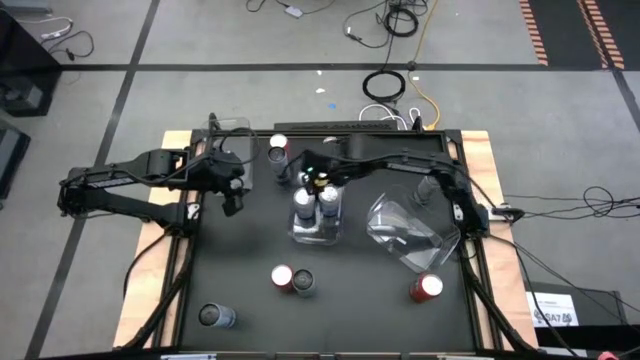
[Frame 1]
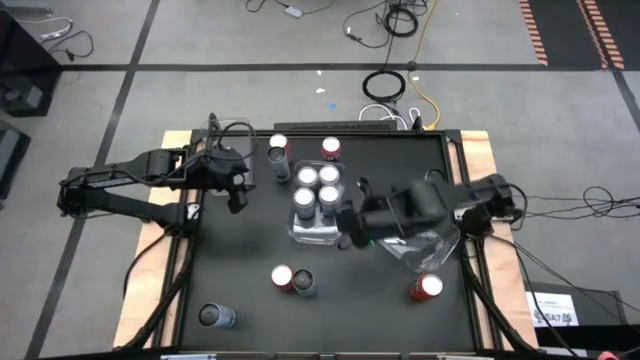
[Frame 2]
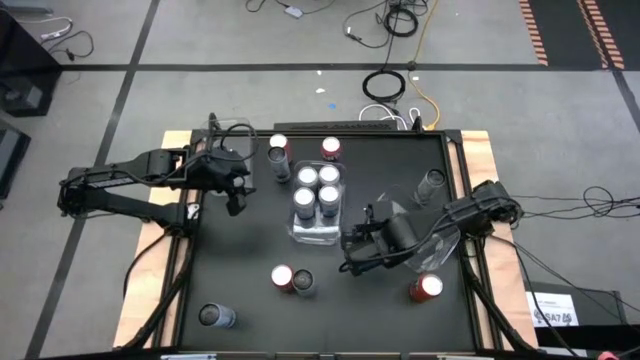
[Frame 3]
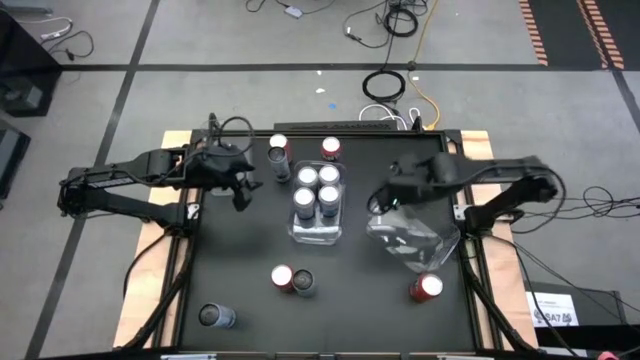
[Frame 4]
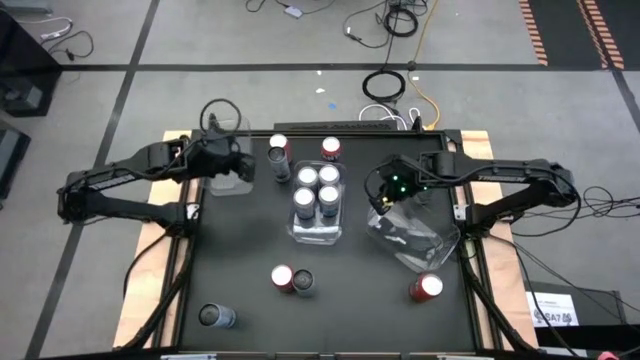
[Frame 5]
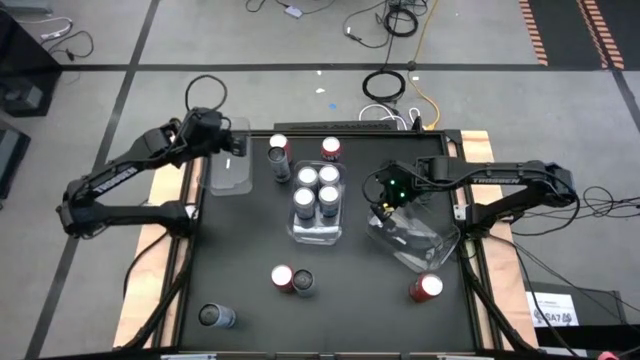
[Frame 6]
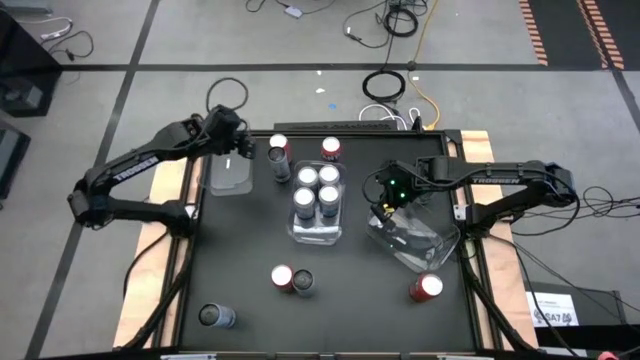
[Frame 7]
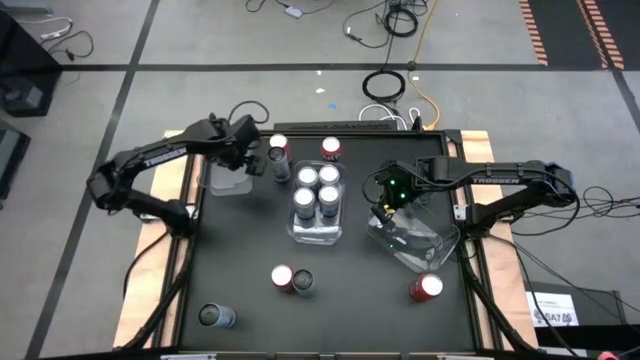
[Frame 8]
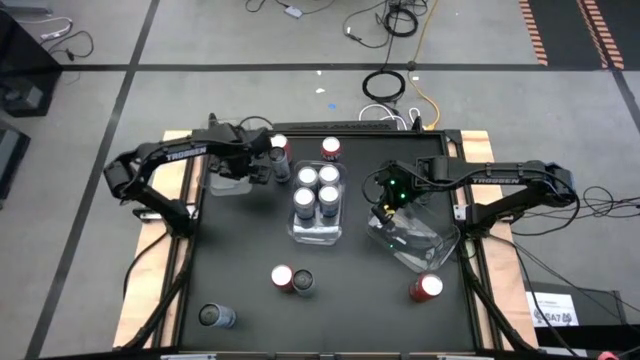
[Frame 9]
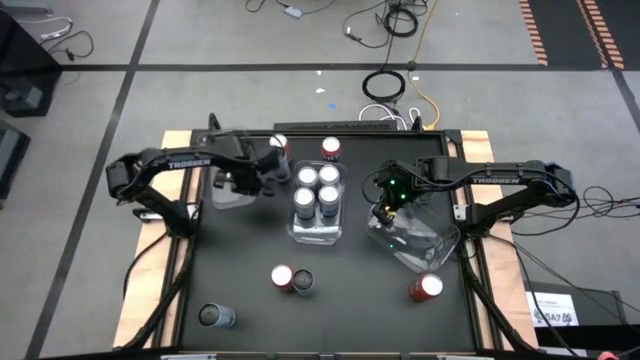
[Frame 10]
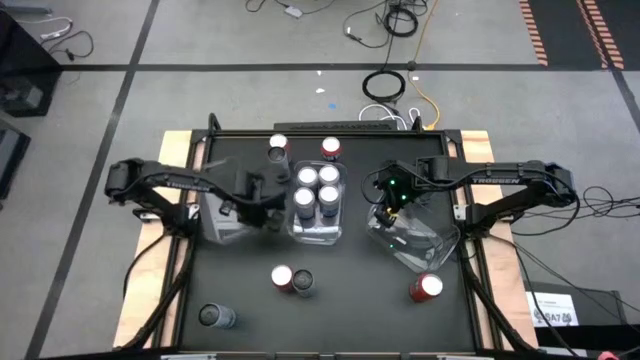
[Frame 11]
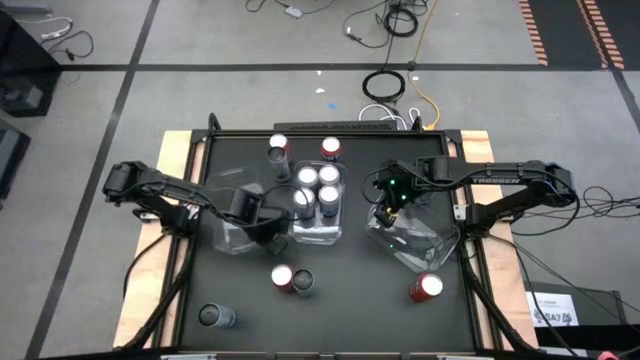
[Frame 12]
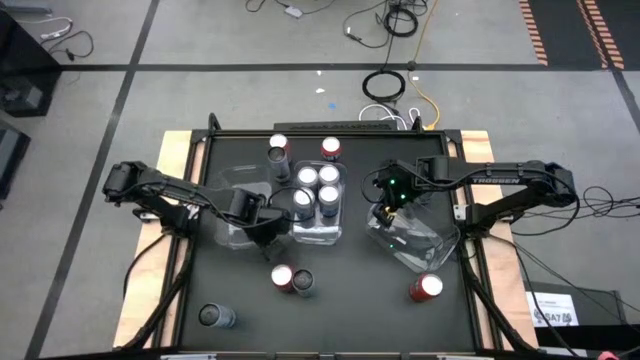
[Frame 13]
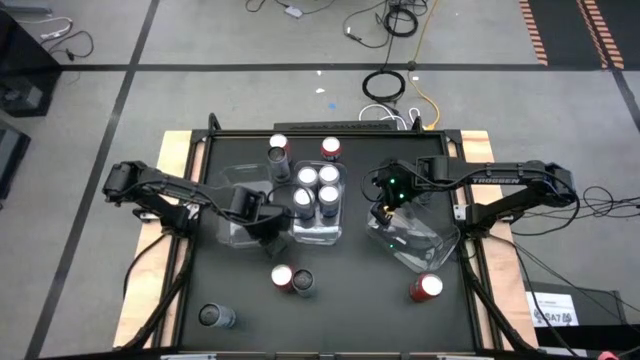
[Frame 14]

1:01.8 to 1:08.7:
Task: Sort soda cans
Move the top transparent bin to the middle left of the table

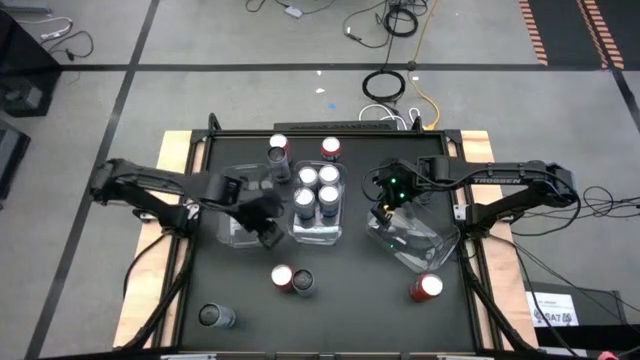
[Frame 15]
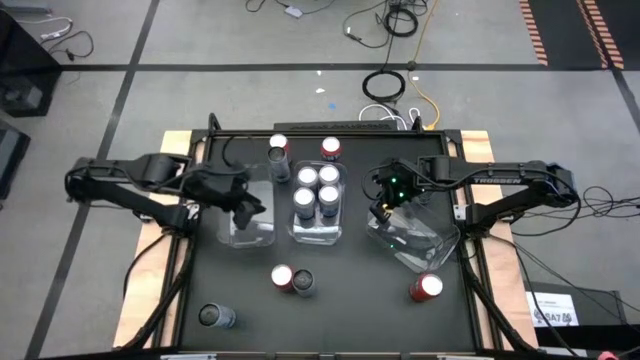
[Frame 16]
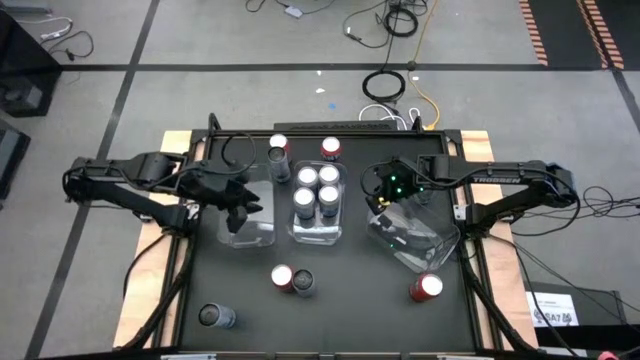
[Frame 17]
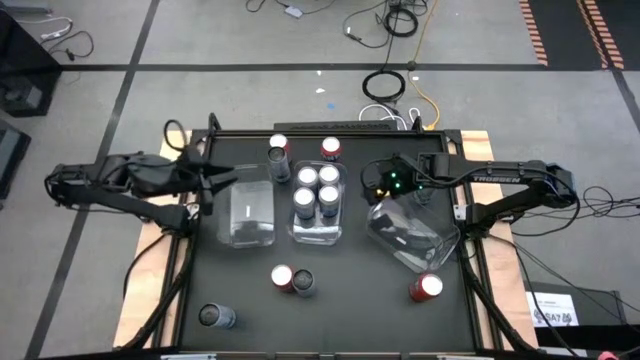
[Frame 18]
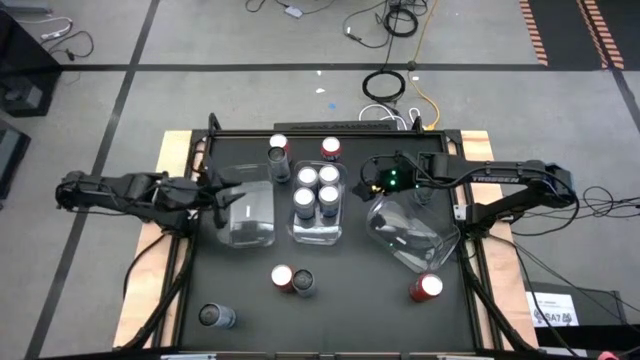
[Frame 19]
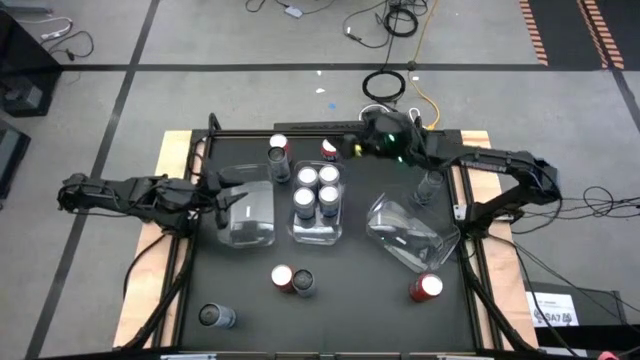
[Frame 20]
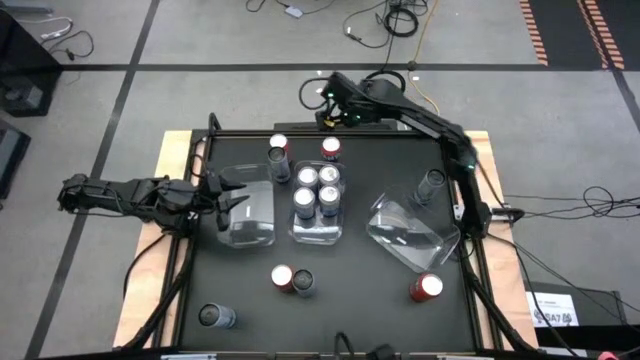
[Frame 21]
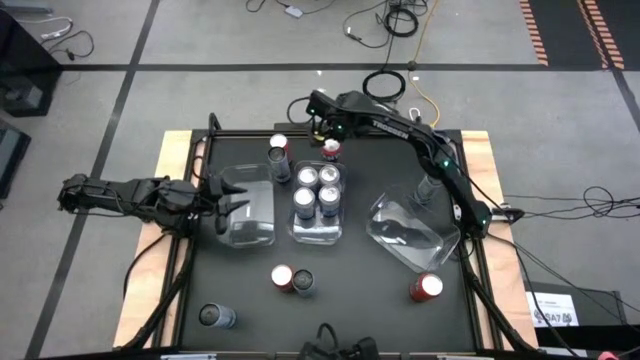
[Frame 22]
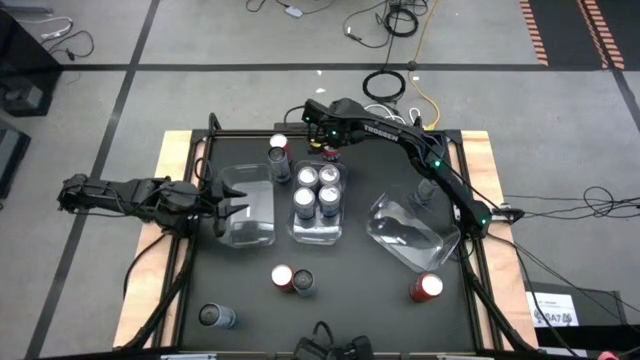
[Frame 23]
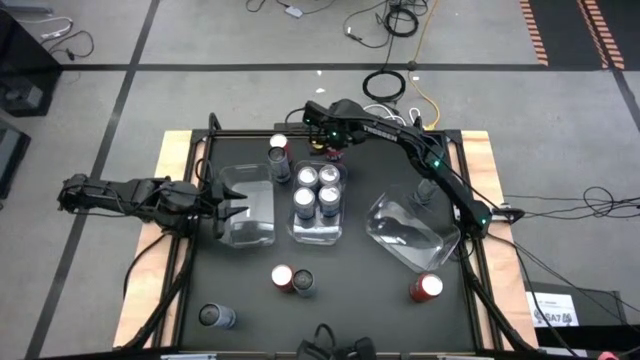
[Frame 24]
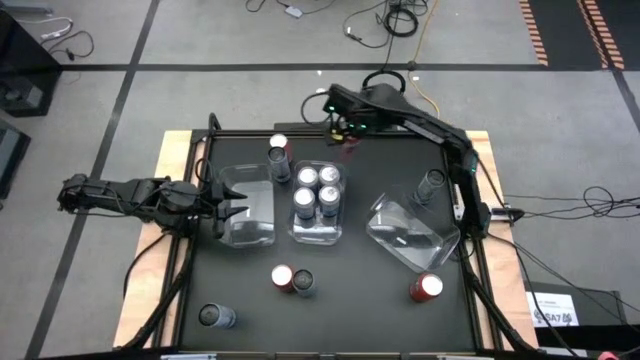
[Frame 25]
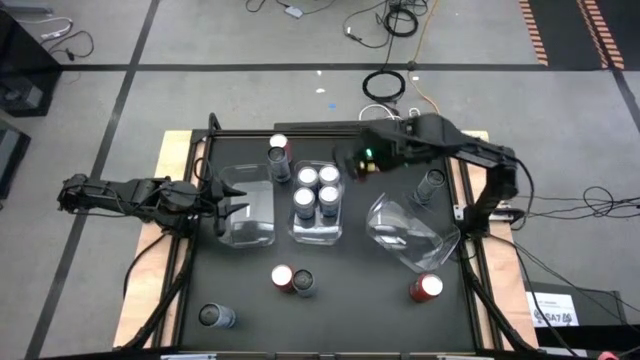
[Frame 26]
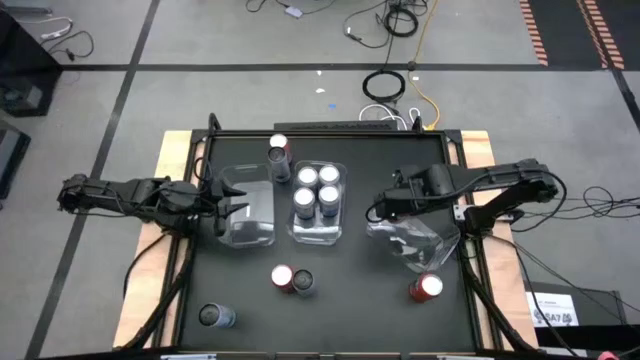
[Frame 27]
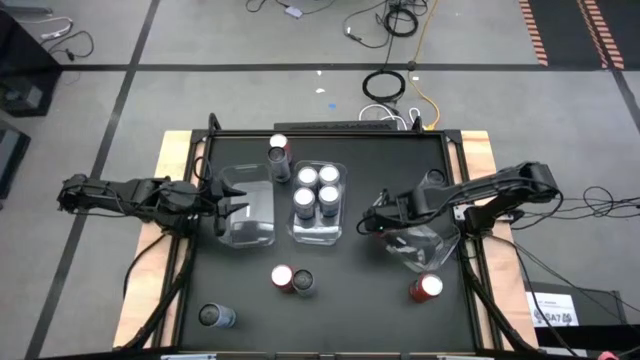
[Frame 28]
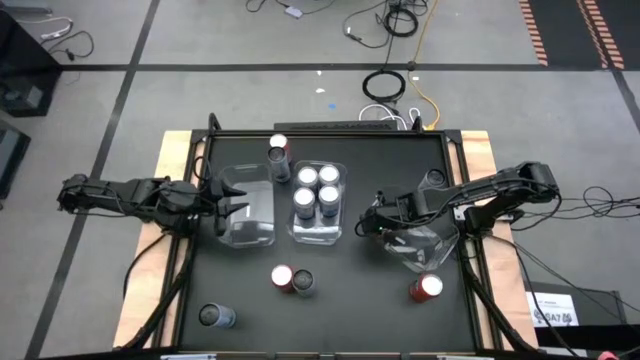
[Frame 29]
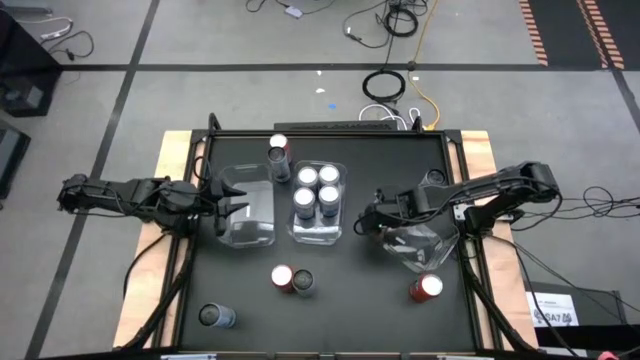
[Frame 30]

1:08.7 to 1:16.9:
Put the top right red soda can into the right transparent bin

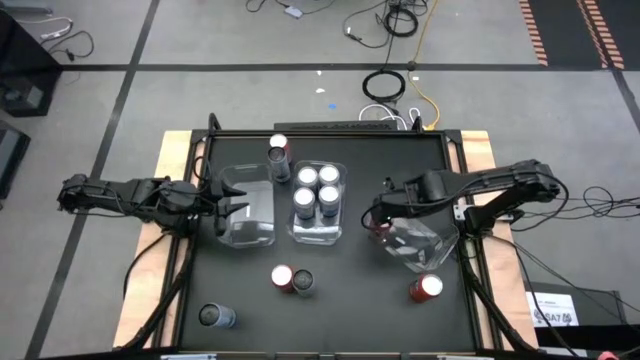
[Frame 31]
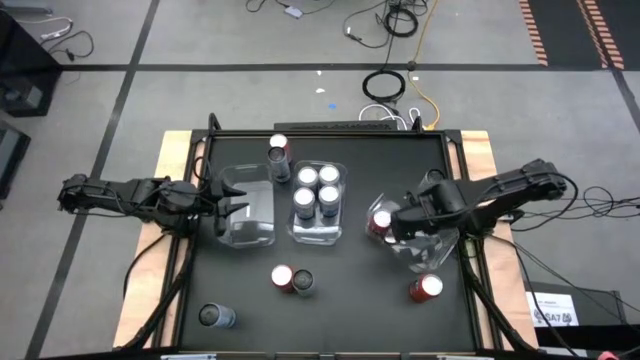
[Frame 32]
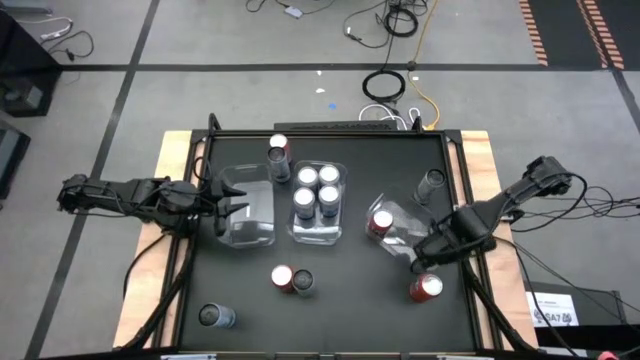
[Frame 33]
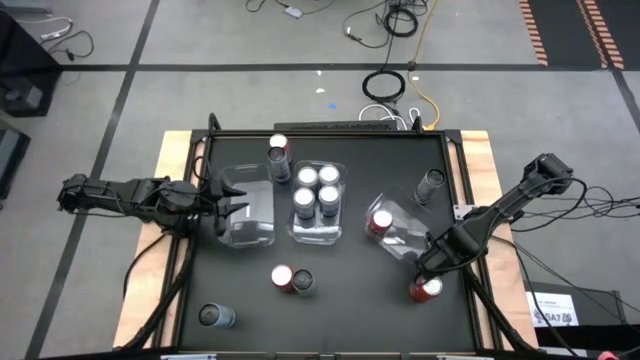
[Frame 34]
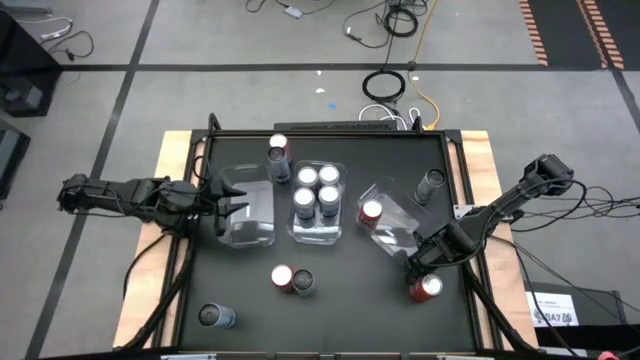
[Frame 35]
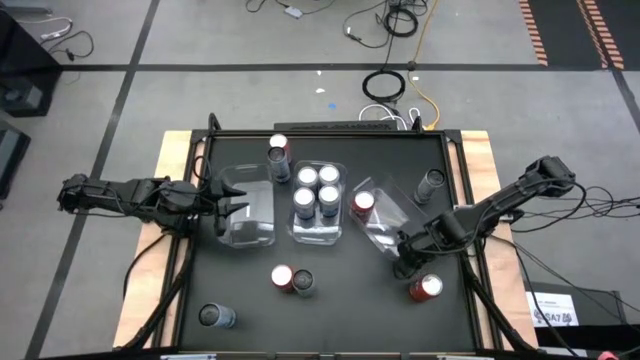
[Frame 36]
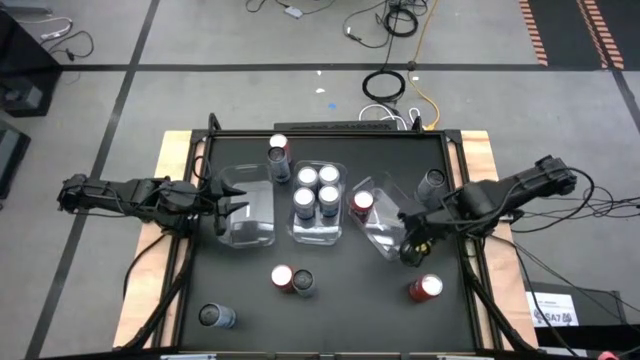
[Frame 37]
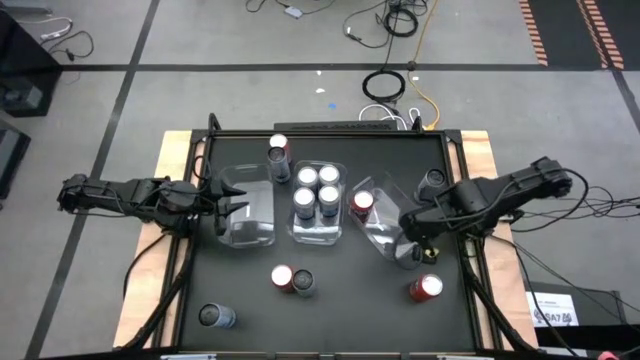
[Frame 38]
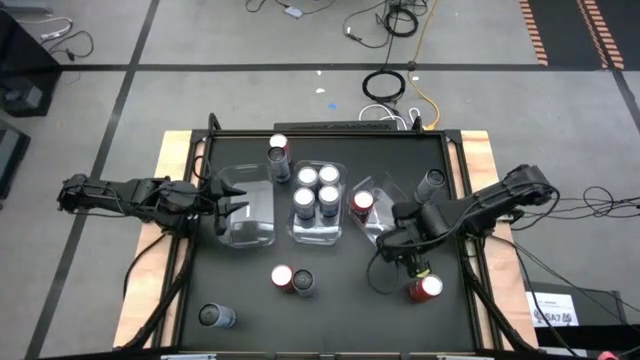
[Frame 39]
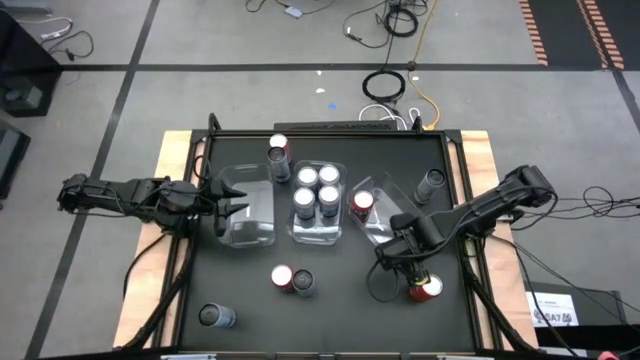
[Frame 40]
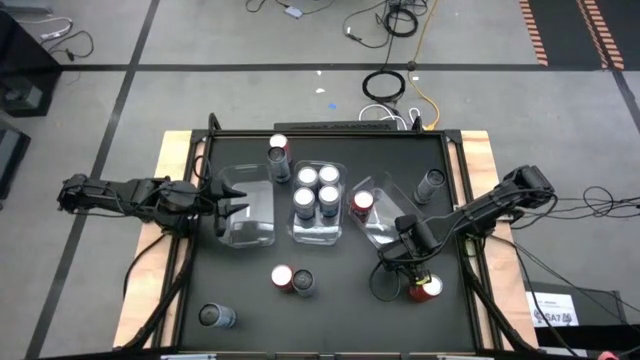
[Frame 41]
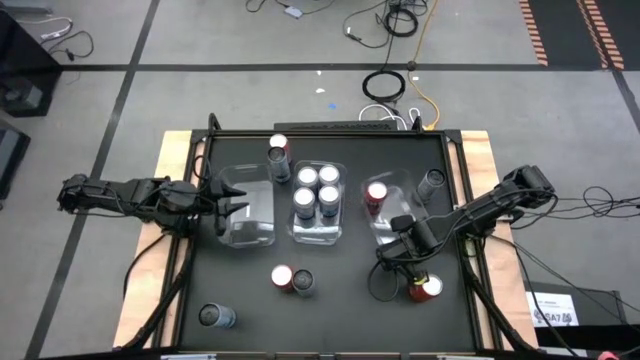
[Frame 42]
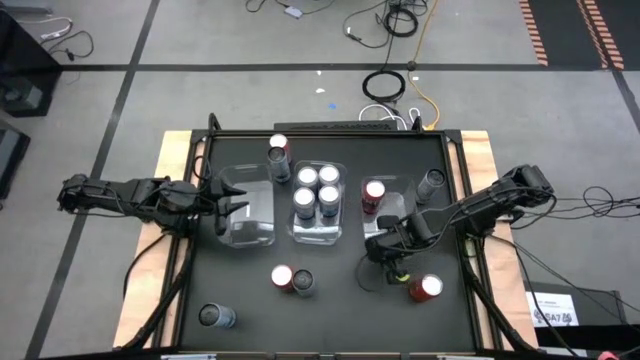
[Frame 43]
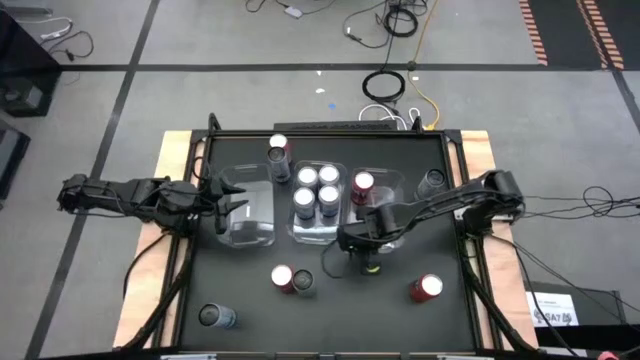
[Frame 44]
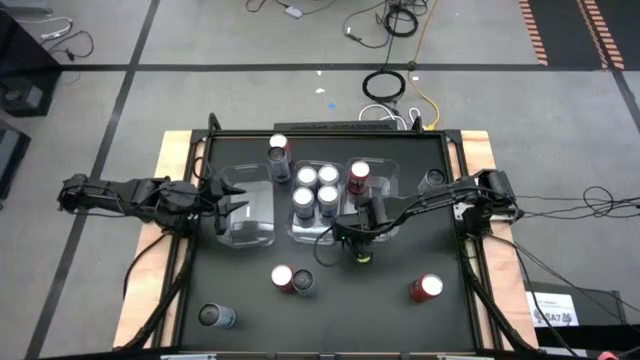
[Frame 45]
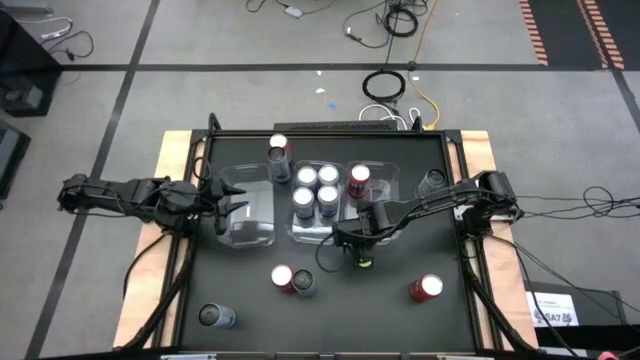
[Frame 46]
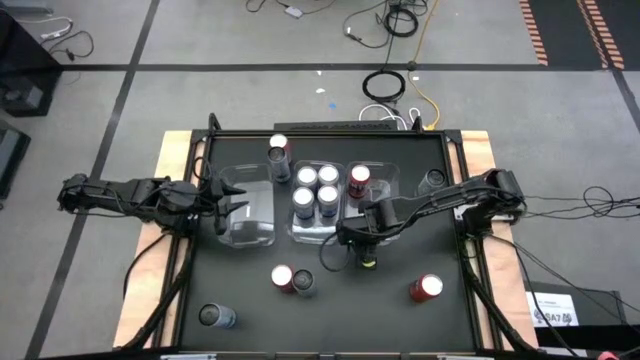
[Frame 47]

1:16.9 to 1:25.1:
Adjust the right transparent bin
